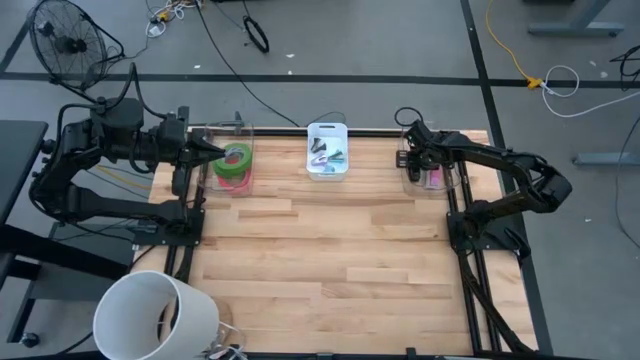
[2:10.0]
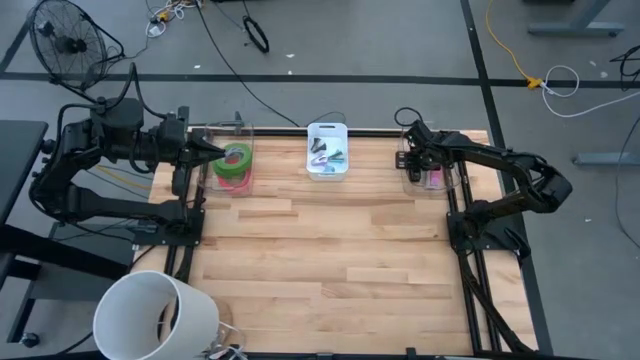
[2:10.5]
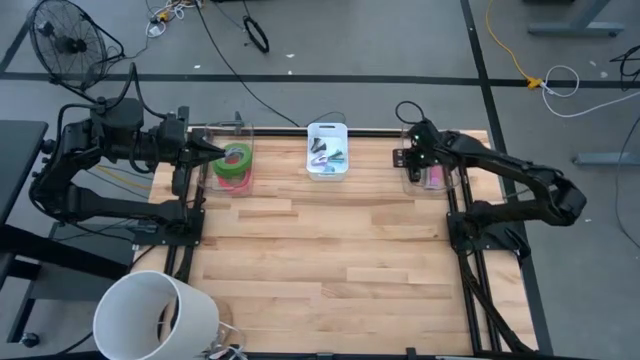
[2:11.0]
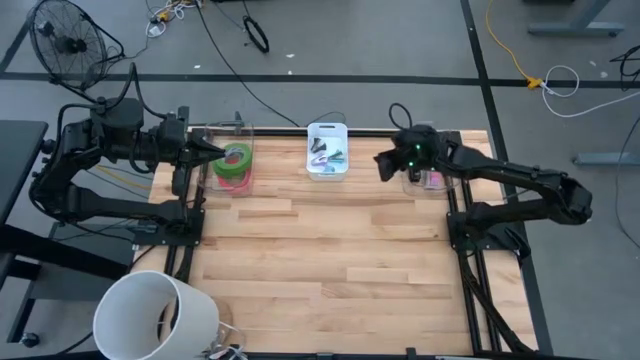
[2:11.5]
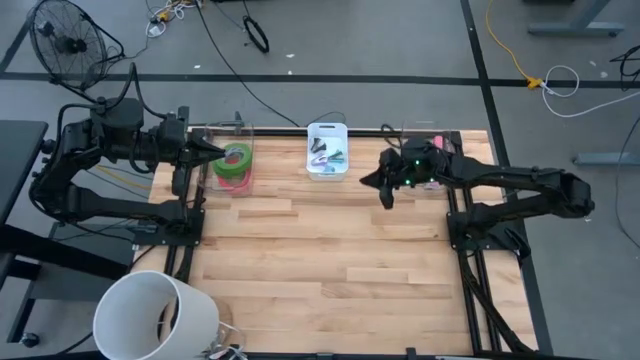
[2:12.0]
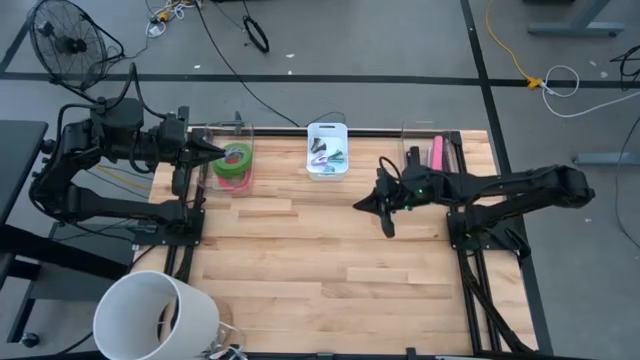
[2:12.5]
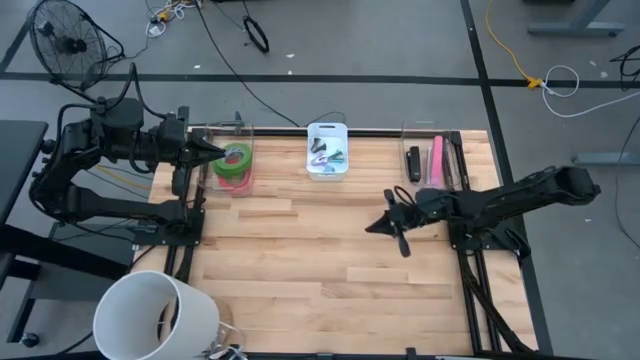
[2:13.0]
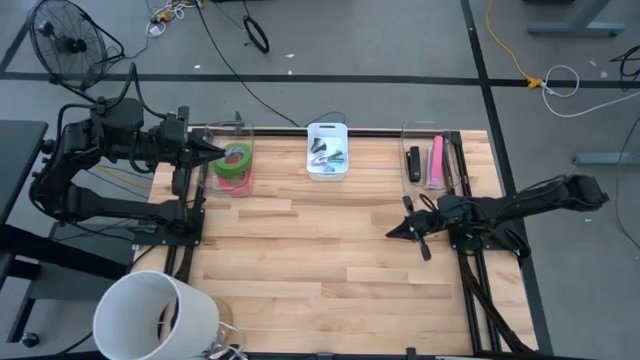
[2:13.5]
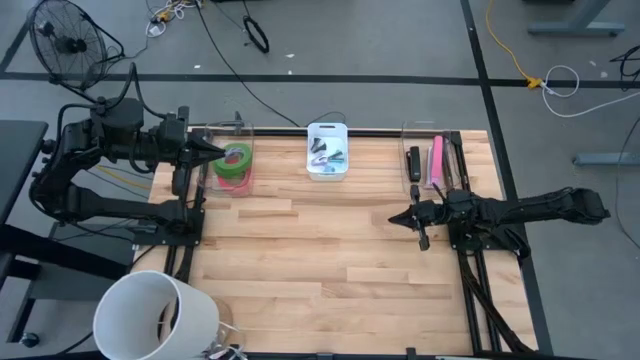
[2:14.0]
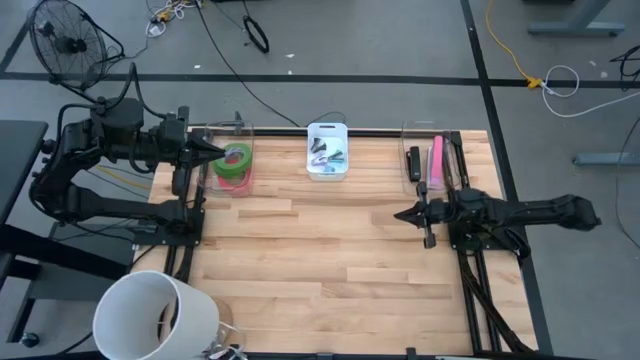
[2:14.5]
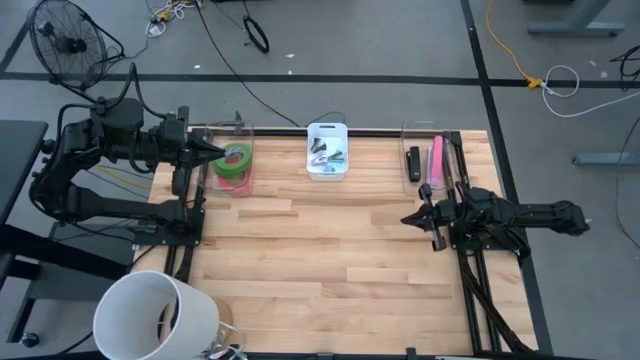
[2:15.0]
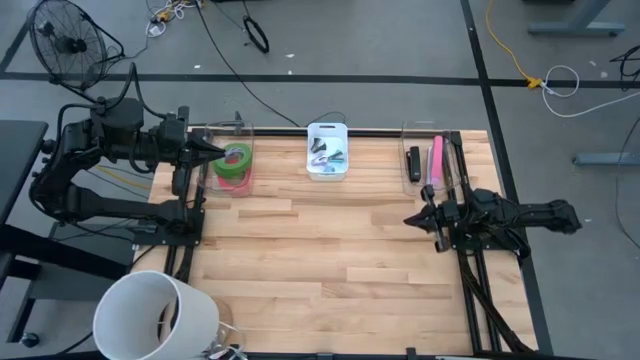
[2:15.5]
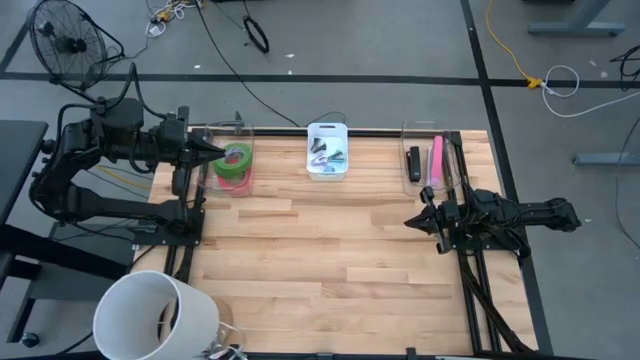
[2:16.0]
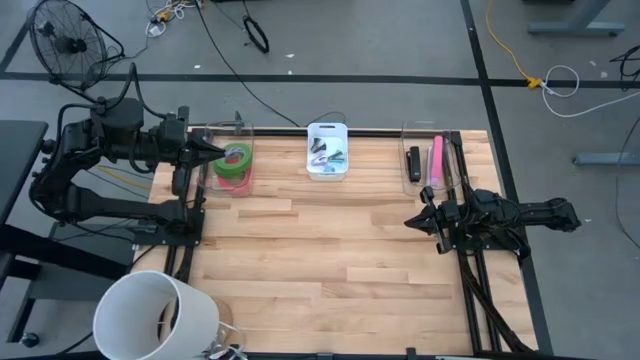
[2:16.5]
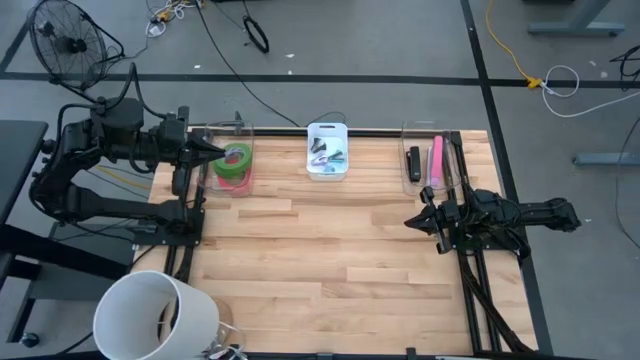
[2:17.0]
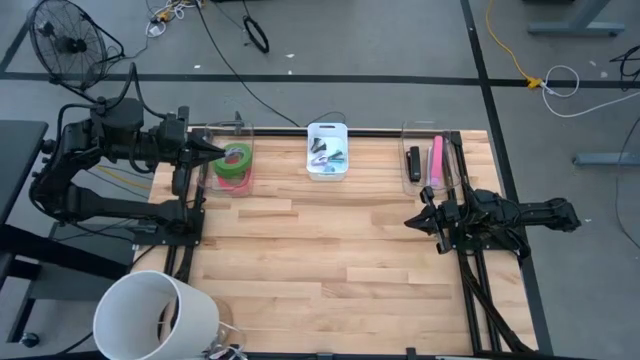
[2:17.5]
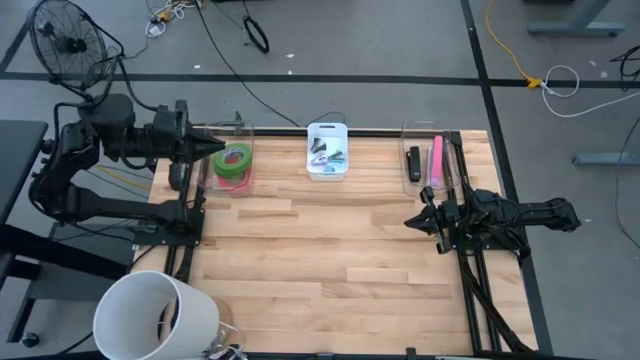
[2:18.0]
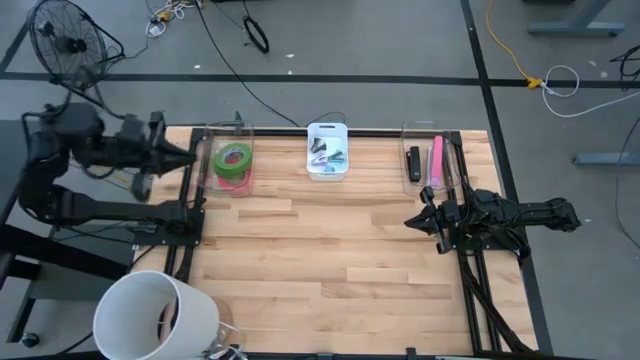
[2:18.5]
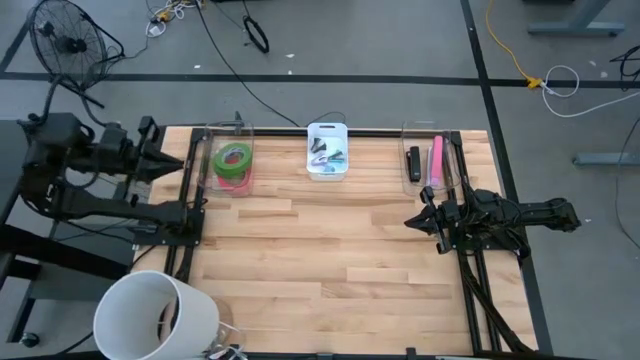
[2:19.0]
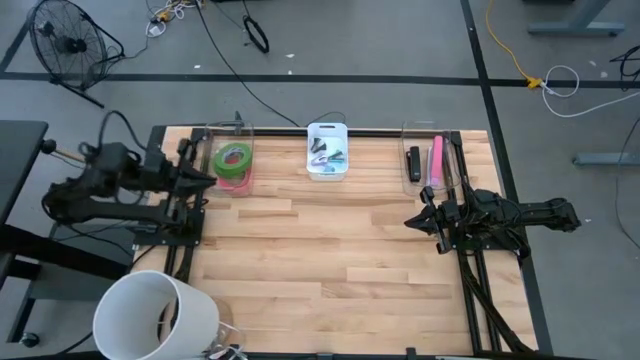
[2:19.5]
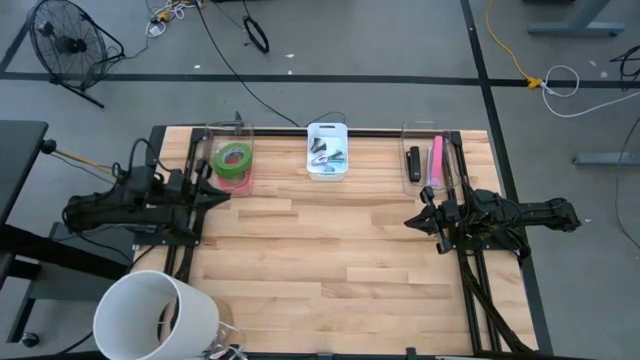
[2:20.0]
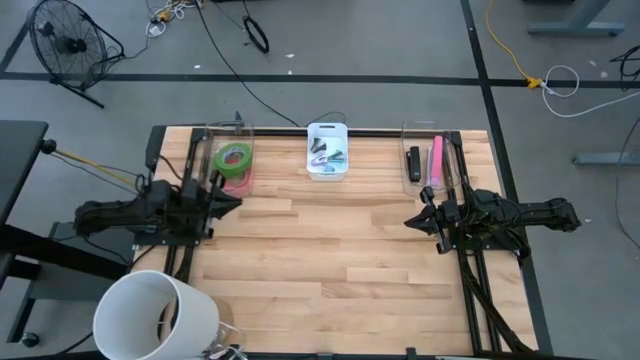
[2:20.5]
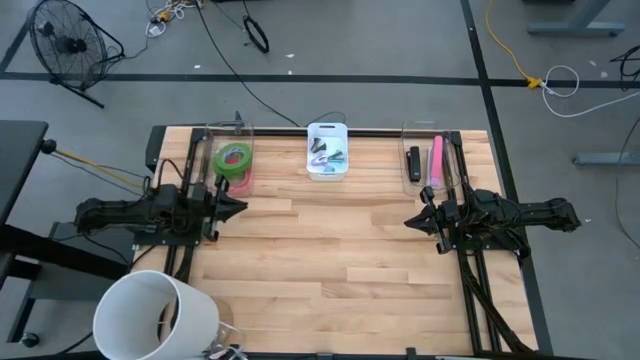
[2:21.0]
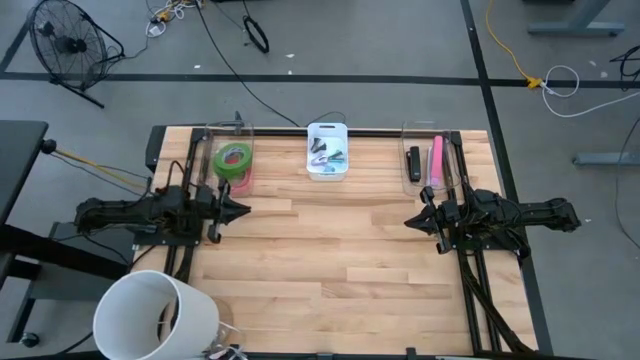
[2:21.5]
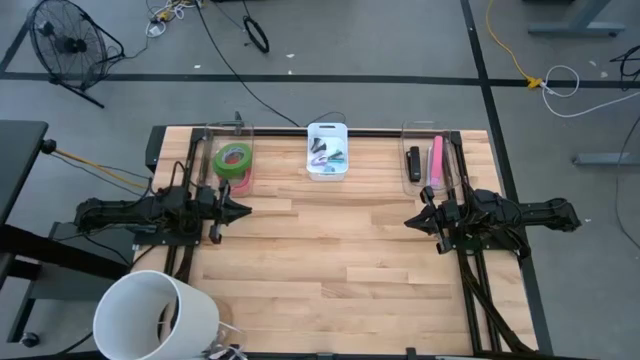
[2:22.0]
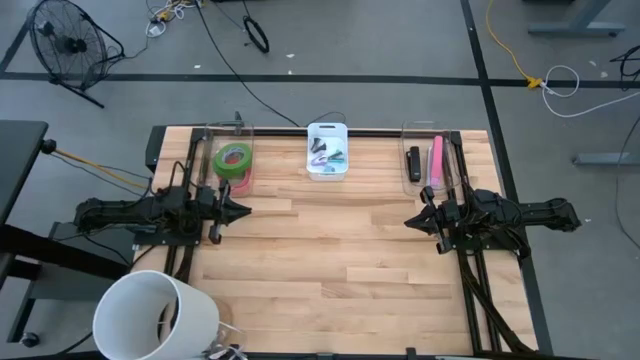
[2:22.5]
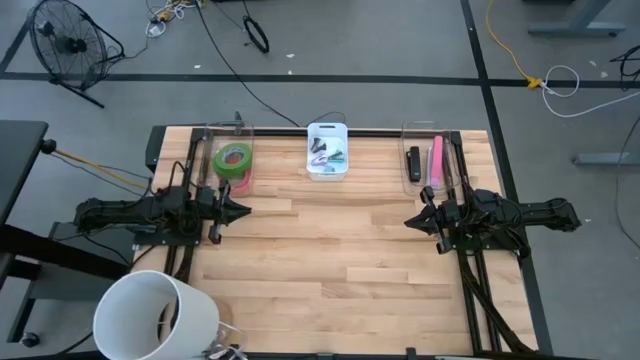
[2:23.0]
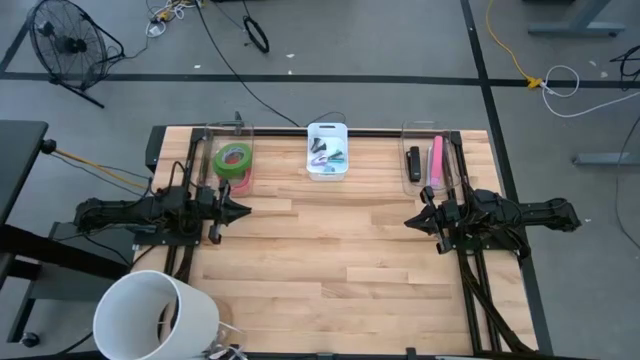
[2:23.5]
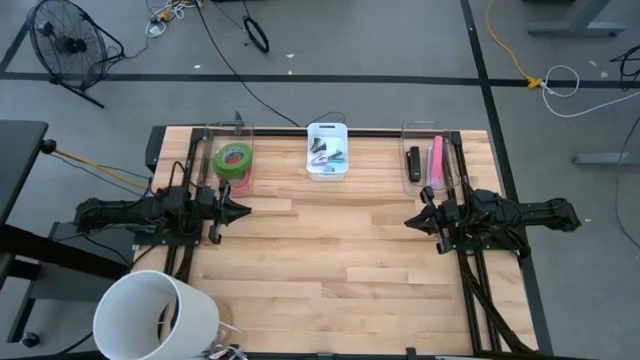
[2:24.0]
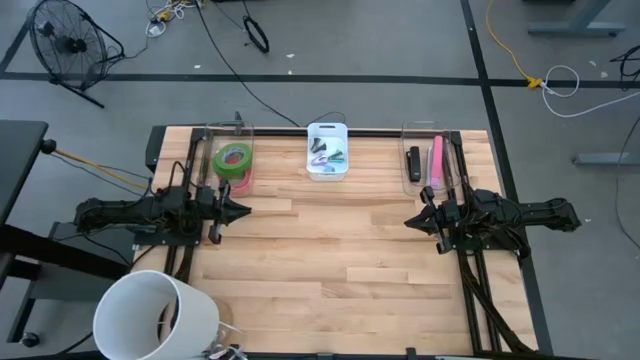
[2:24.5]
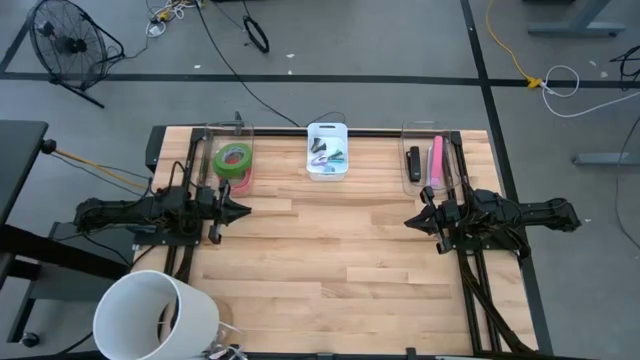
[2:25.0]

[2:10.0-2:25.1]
Task: Pick and place Stapler, Stapler remover, tape
Return to Home Position

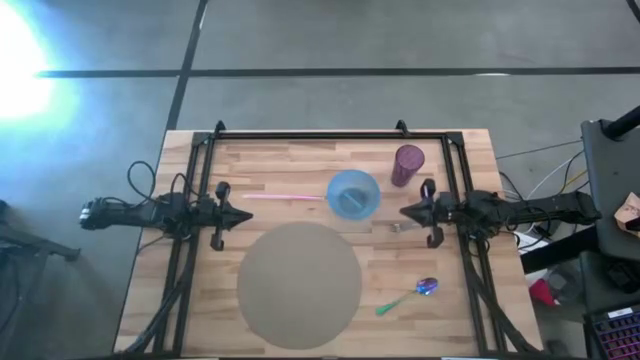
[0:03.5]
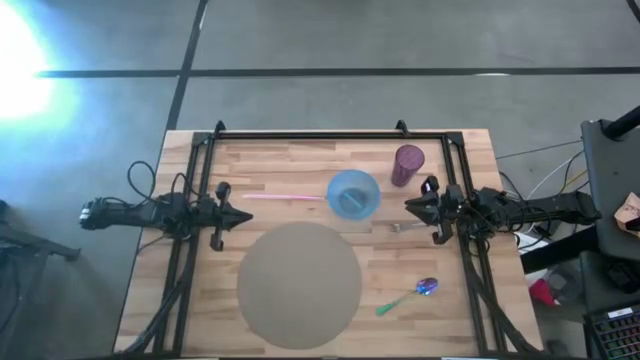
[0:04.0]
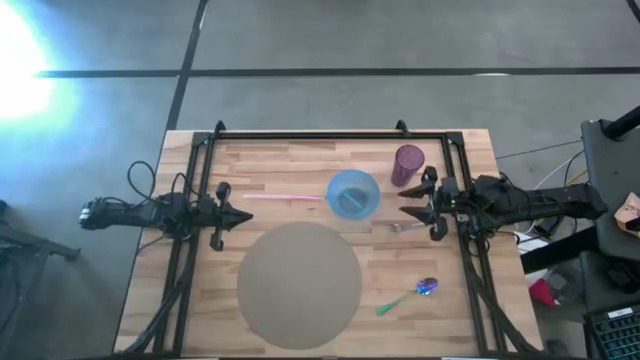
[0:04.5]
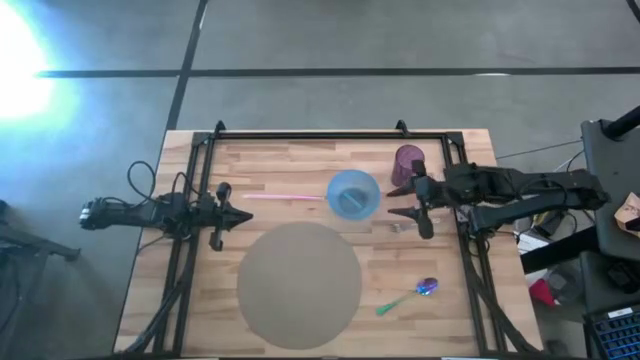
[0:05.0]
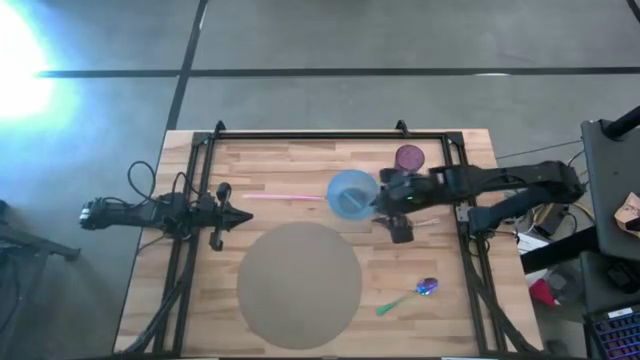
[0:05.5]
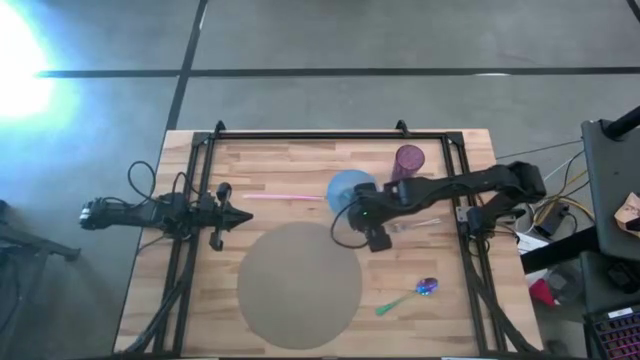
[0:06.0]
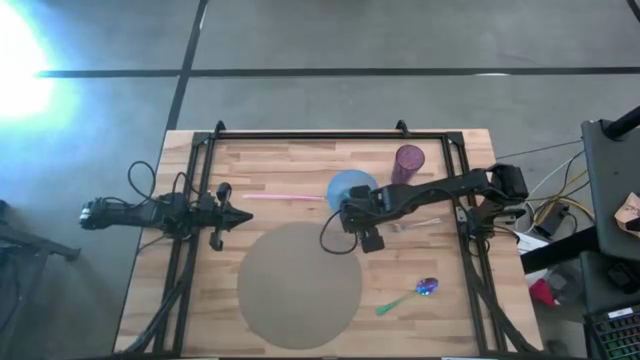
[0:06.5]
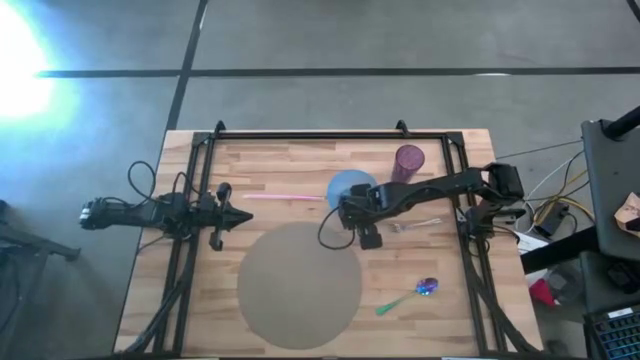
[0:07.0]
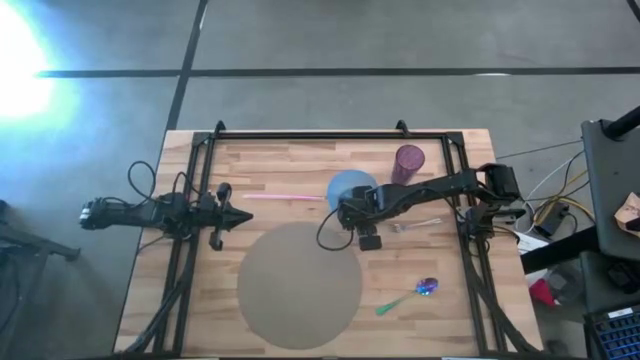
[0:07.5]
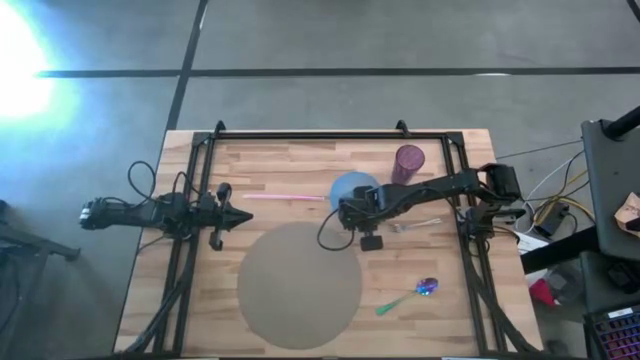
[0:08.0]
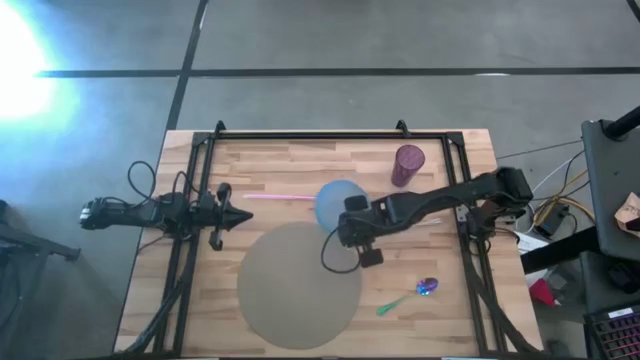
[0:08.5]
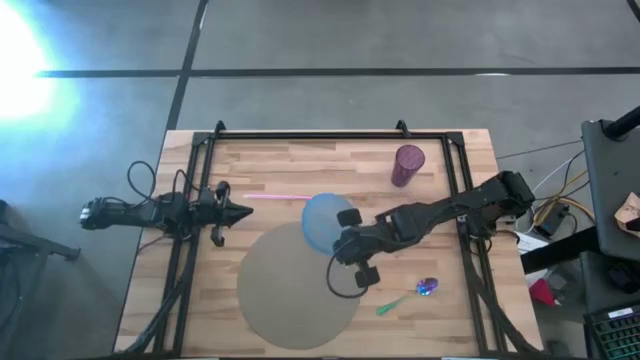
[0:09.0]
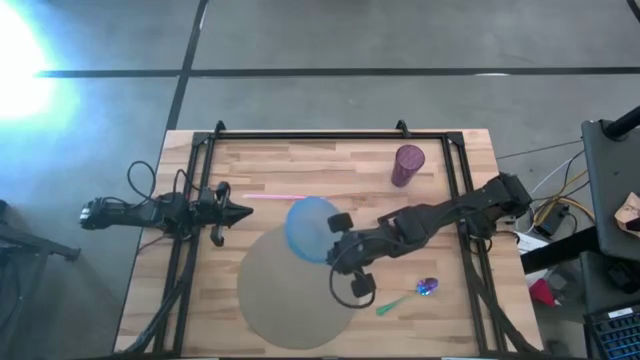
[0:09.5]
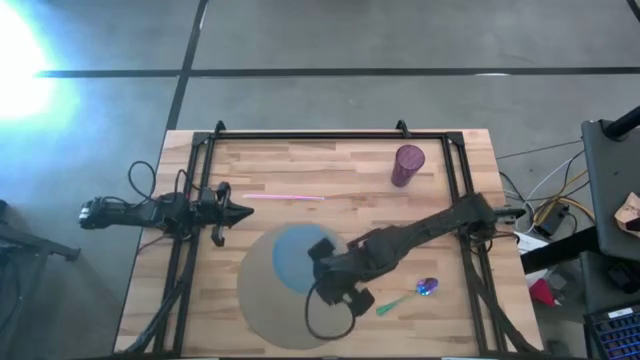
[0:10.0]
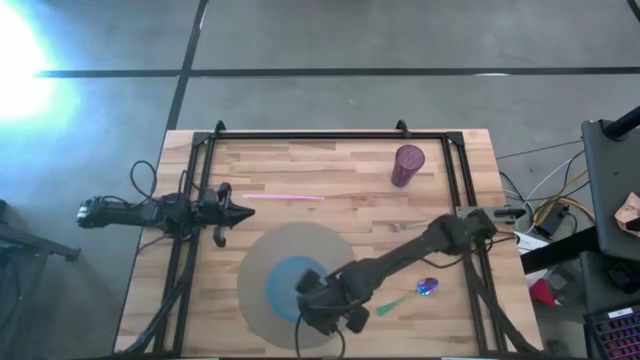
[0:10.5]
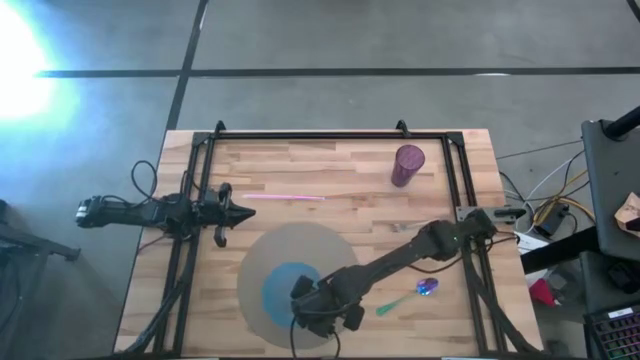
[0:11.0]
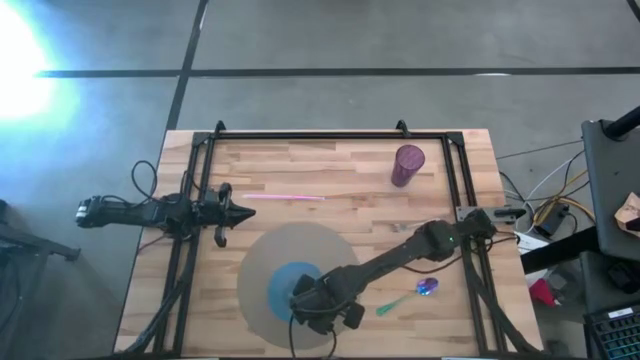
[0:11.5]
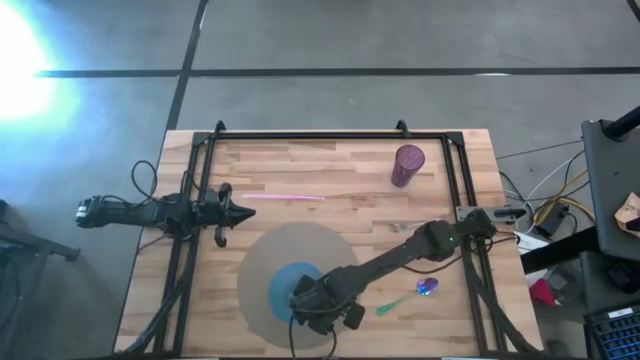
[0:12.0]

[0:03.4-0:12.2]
Task: Pick & Place Utensil
Put the blue bowl on the brown placemat
